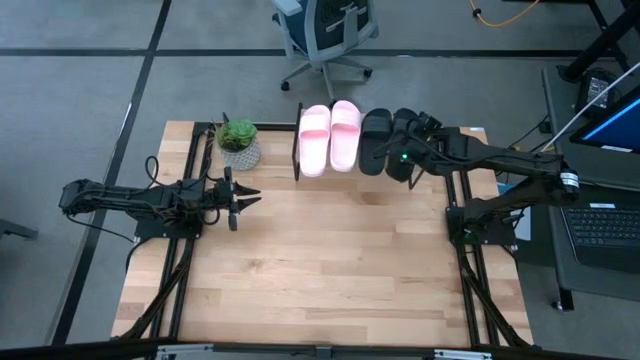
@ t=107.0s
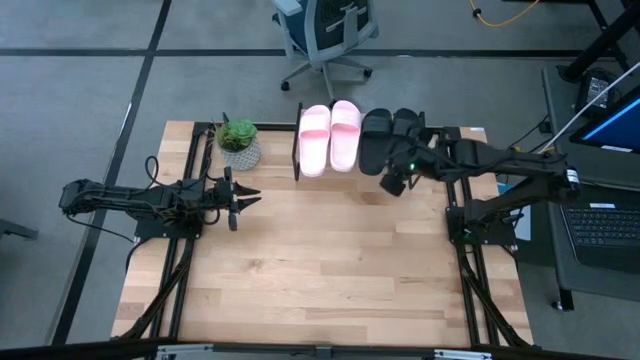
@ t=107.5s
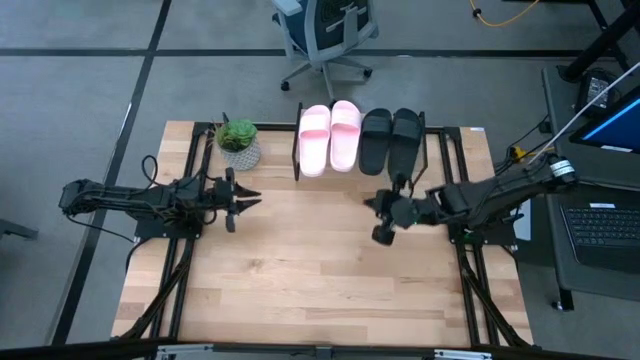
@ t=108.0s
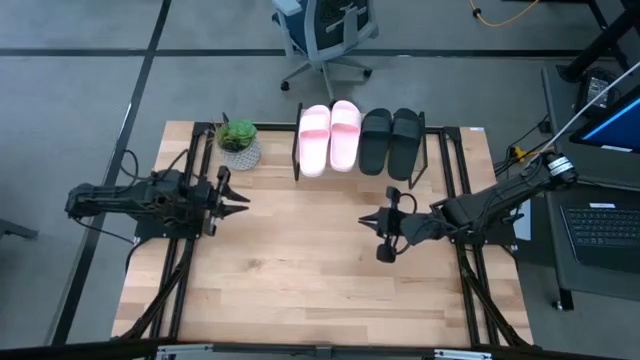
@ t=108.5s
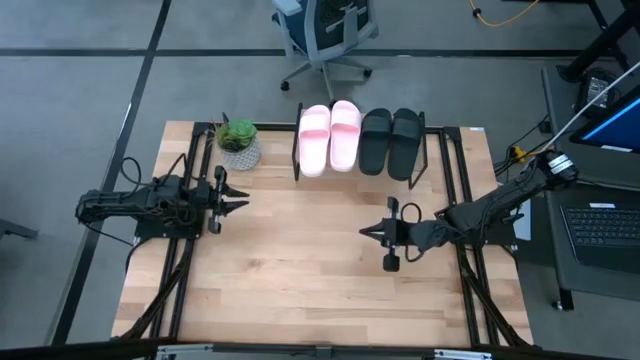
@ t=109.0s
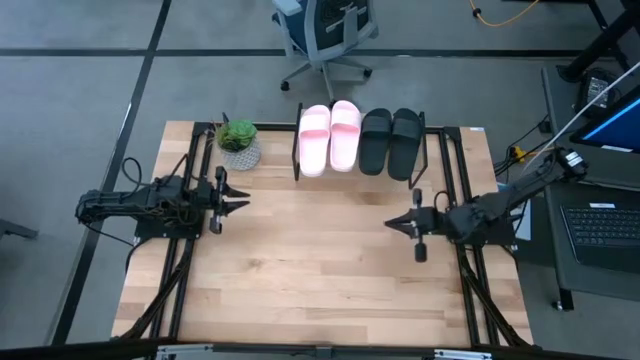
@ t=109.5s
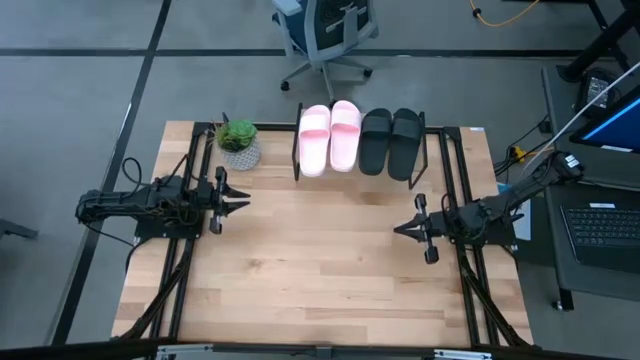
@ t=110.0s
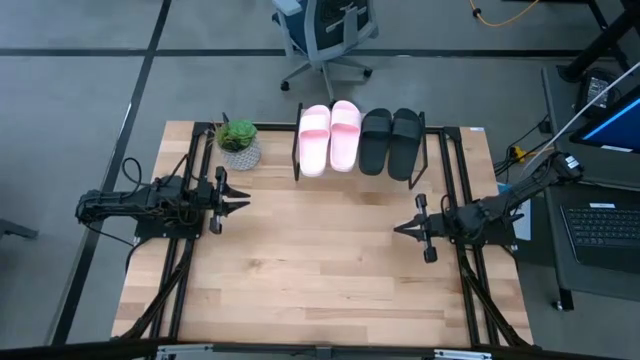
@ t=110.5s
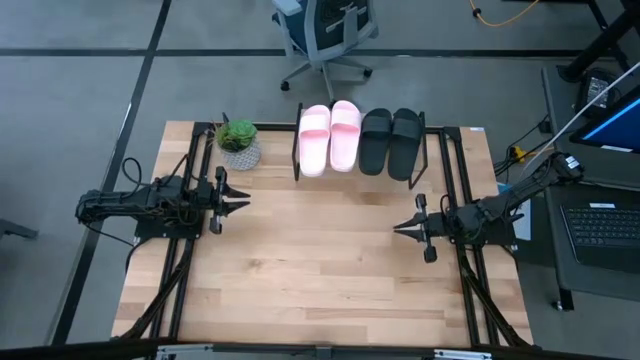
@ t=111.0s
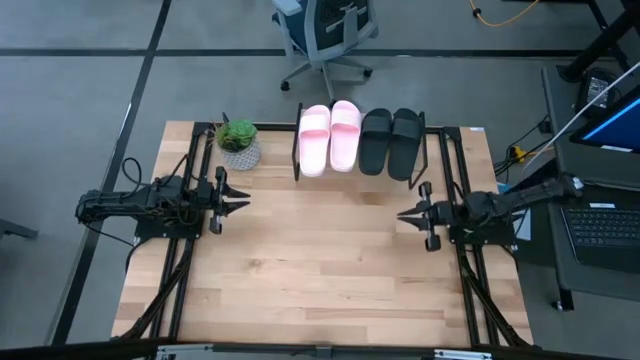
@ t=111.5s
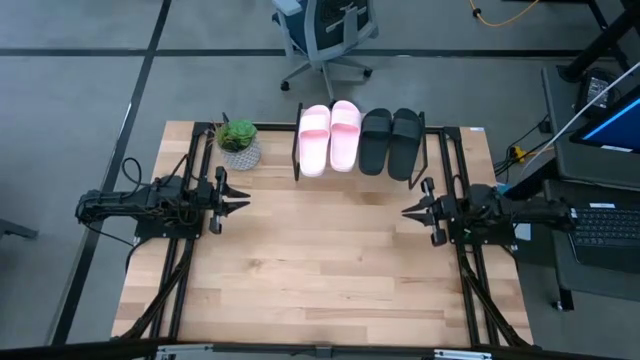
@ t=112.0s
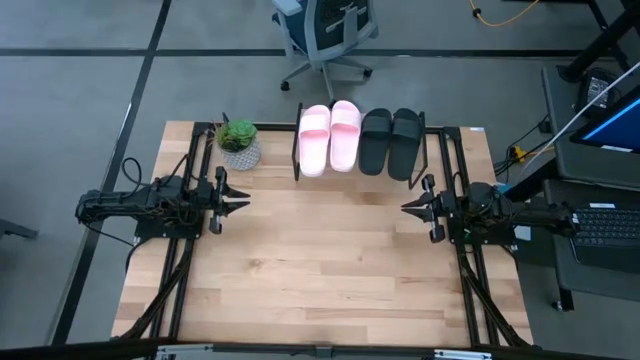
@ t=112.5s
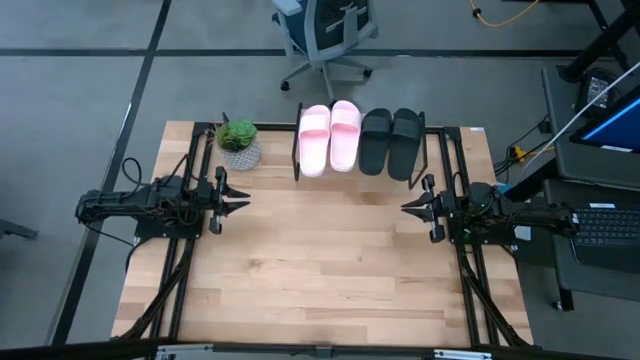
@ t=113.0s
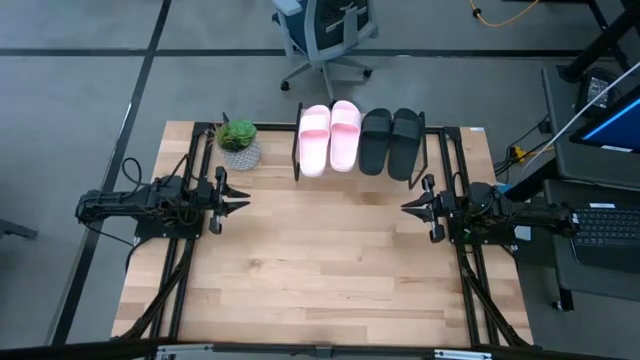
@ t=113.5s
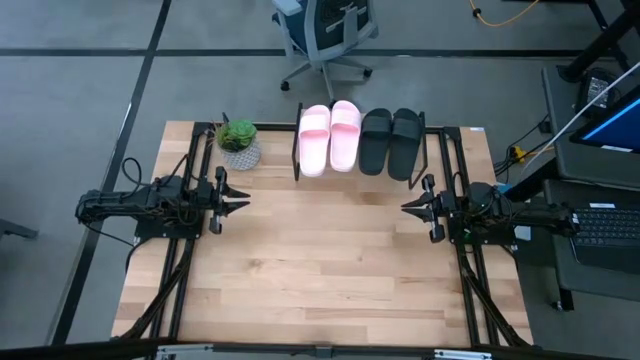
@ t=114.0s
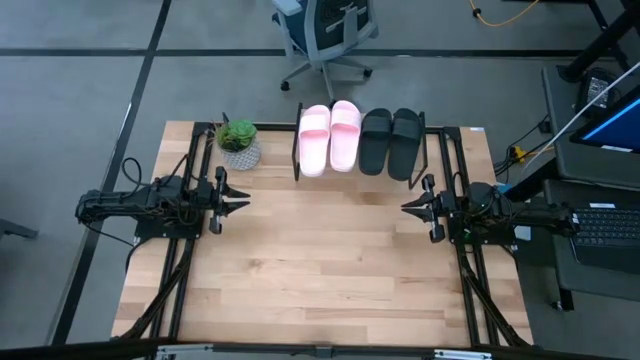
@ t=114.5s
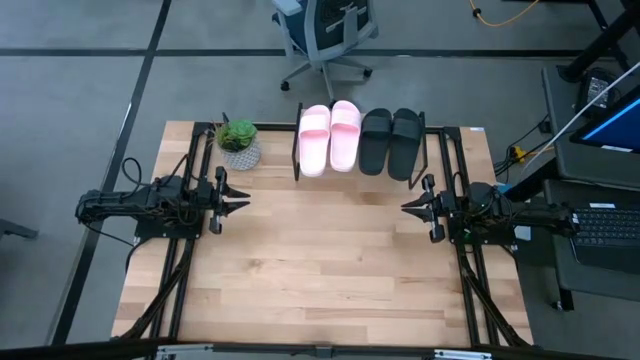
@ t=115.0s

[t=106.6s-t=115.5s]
Task: Pick and place slides into the shelf
Return to Home Position

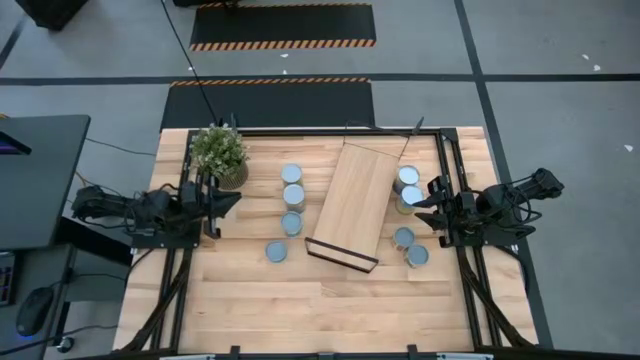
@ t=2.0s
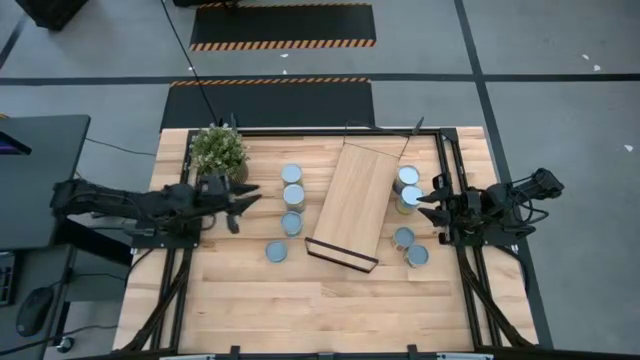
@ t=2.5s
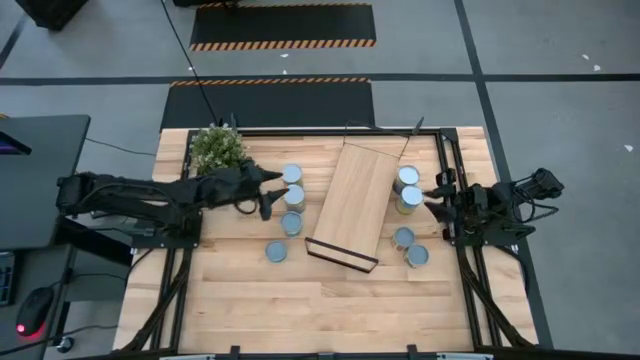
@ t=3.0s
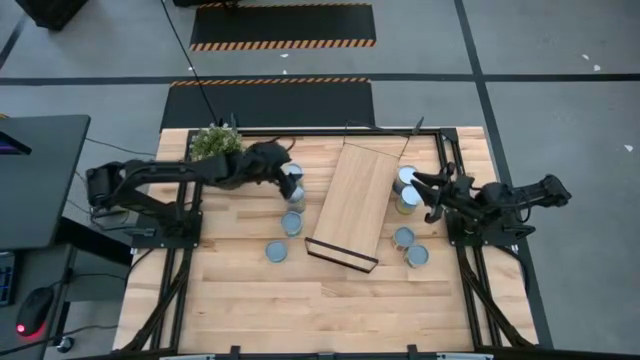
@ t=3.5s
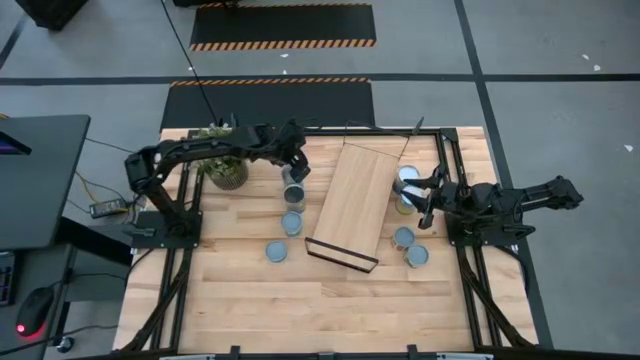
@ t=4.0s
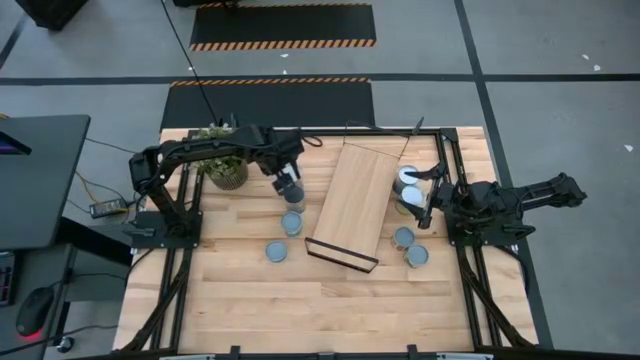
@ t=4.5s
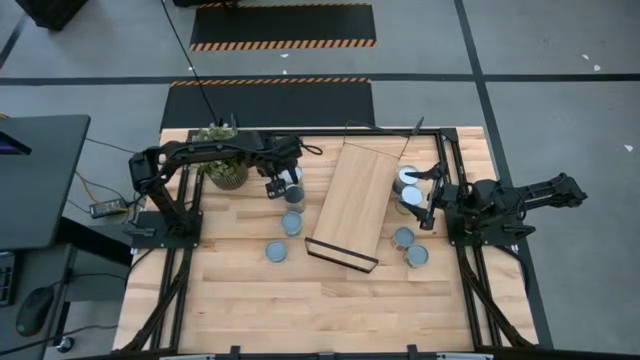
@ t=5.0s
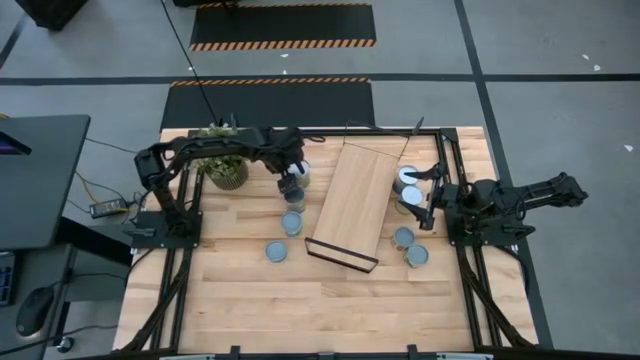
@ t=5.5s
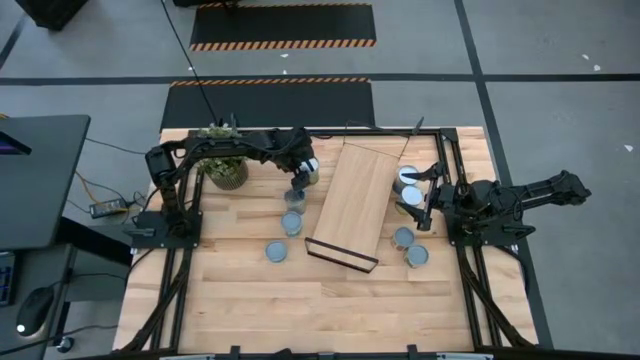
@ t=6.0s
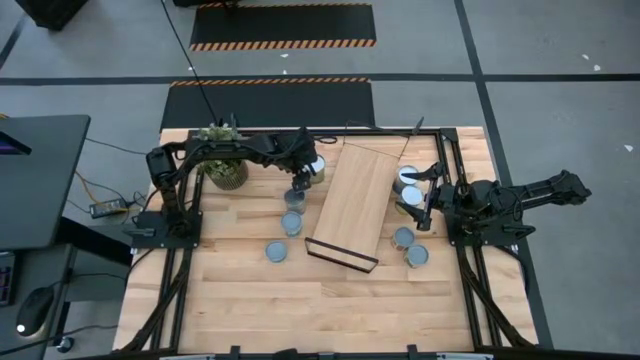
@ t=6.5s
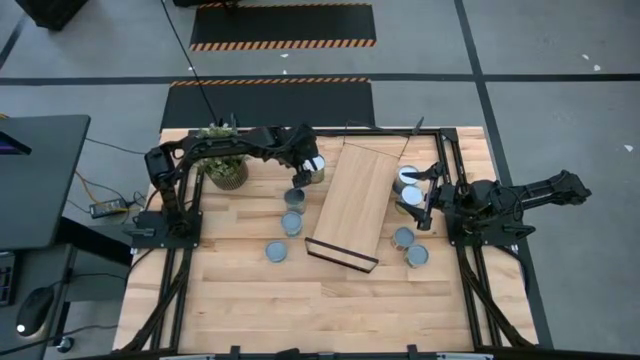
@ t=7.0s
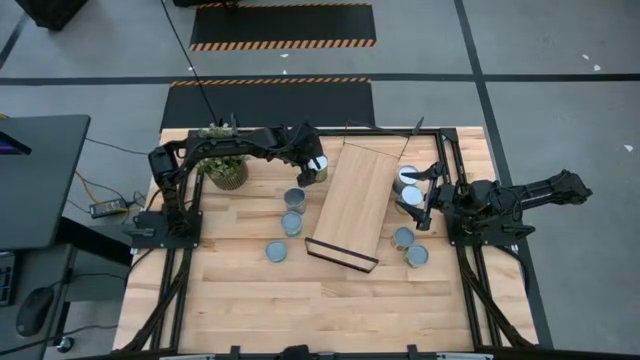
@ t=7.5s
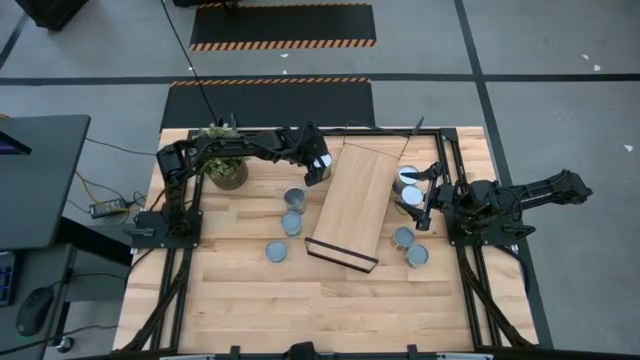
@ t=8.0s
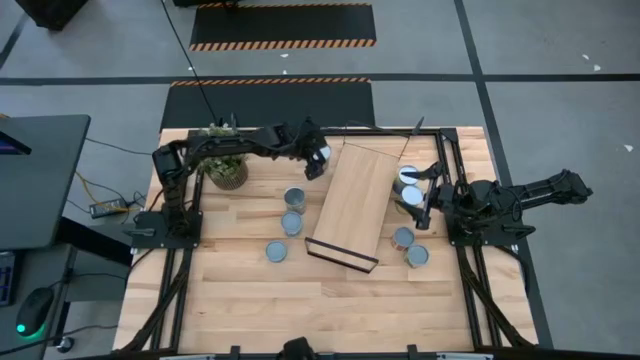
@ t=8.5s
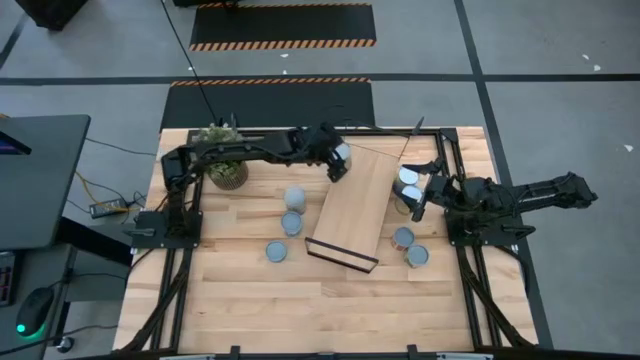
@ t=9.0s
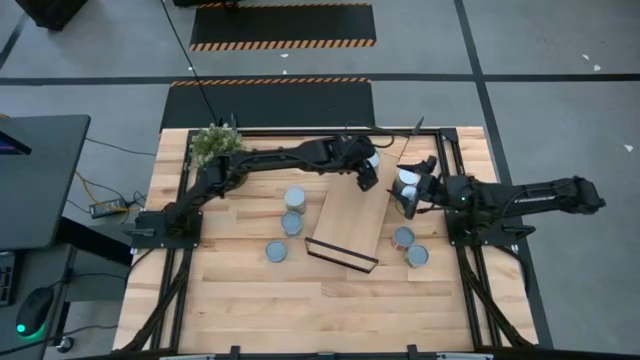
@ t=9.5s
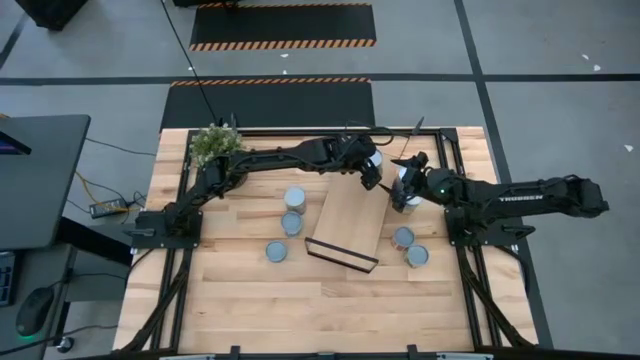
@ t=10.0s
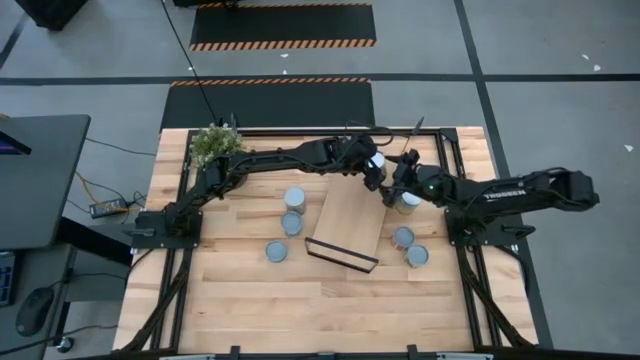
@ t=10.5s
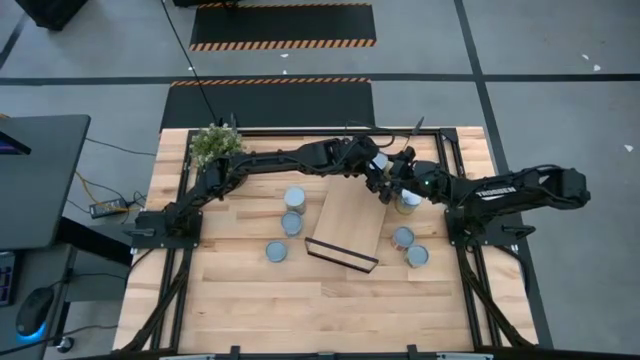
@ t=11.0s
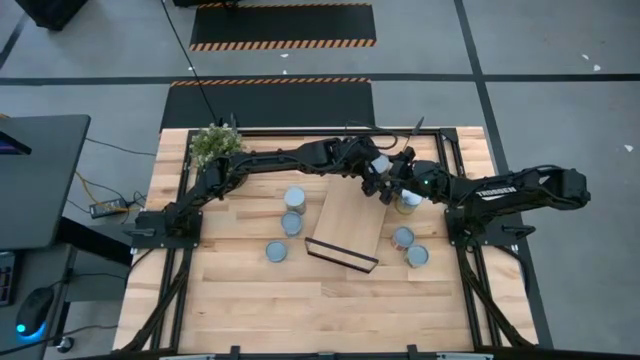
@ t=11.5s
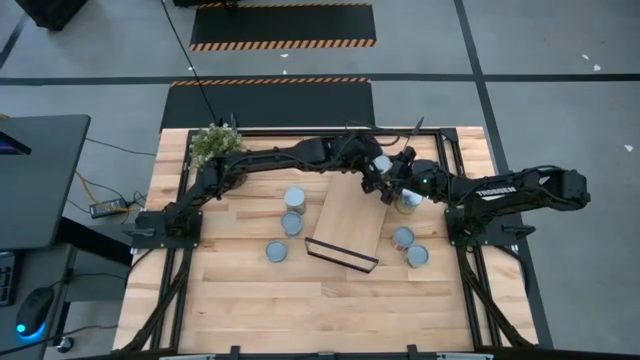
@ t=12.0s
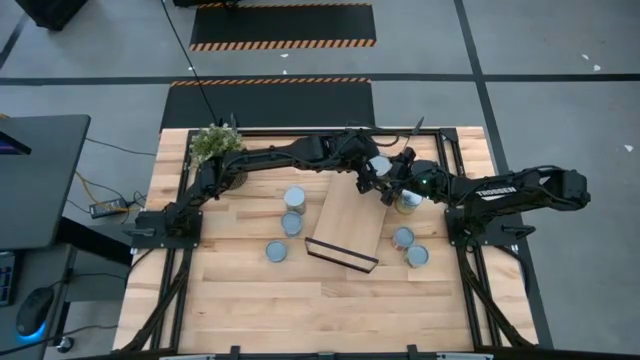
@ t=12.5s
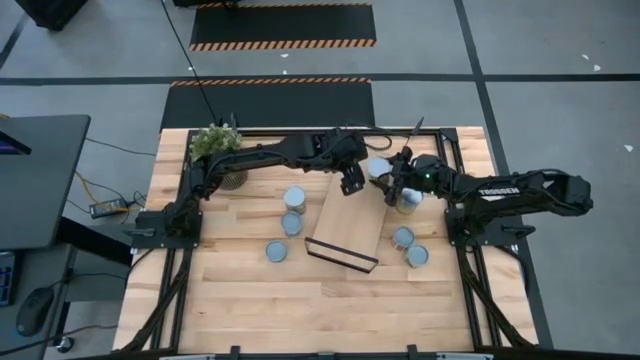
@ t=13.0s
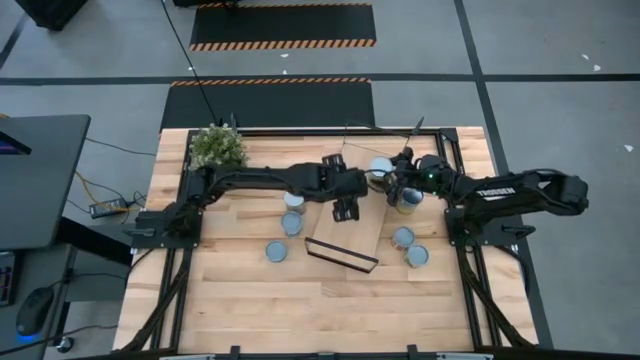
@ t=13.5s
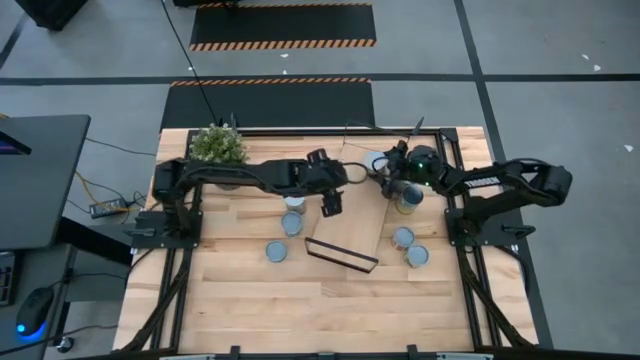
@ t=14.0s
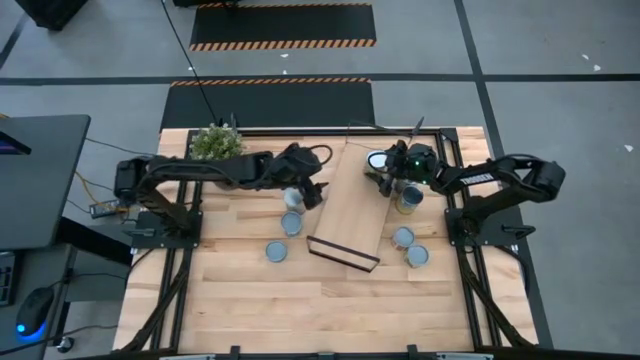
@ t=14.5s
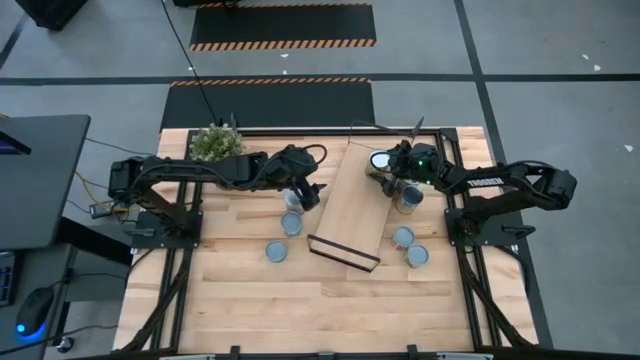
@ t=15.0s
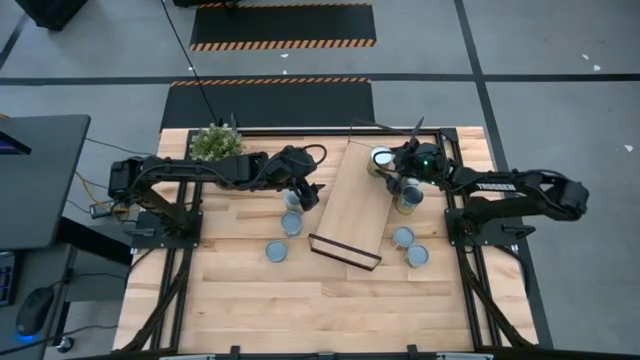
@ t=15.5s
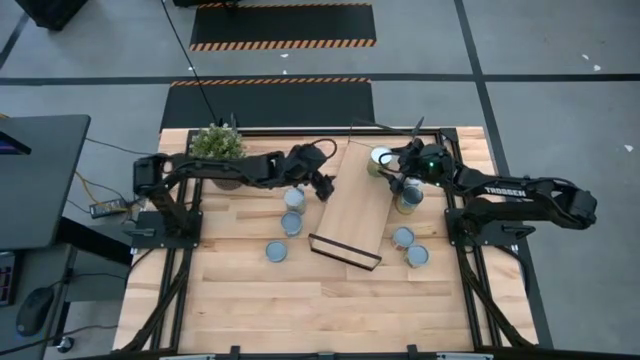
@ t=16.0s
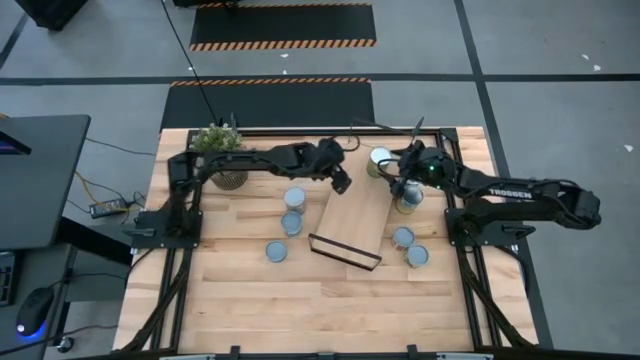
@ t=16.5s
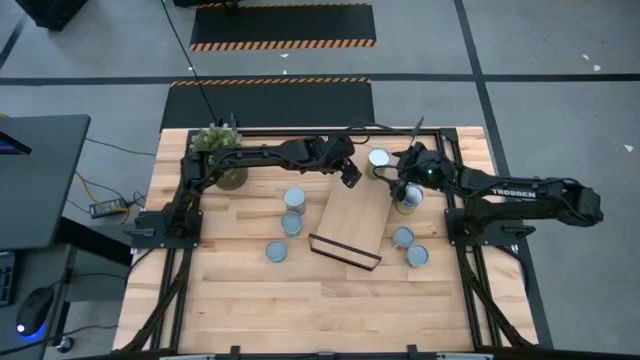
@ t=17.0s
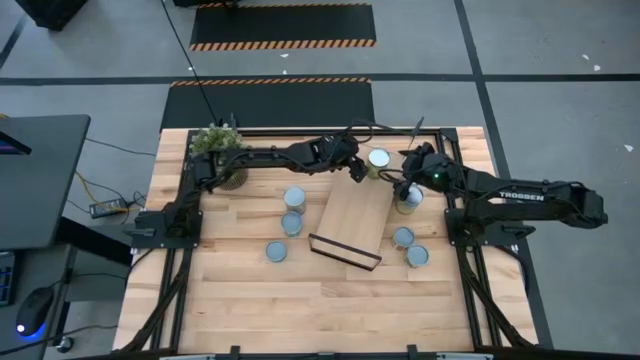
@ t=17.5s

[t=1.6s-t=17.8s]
Task: Pick and place cans onto a shelf
Put the canned oranges on the shelf
